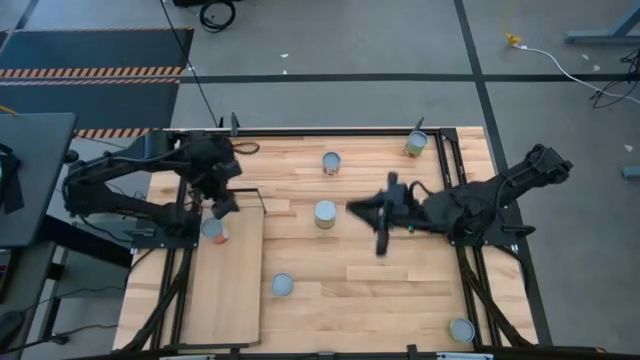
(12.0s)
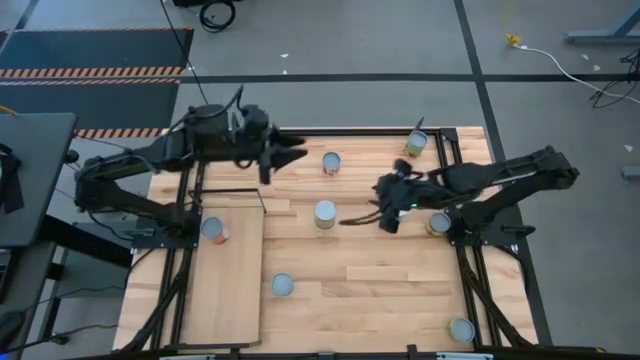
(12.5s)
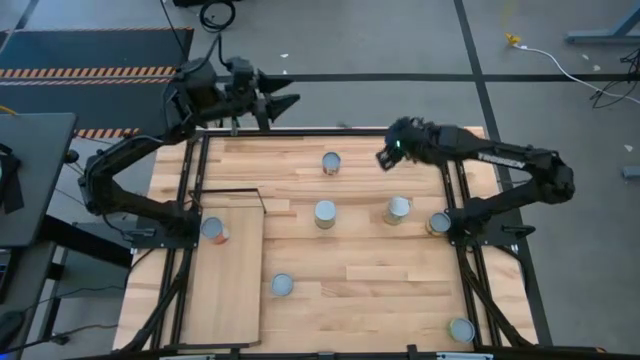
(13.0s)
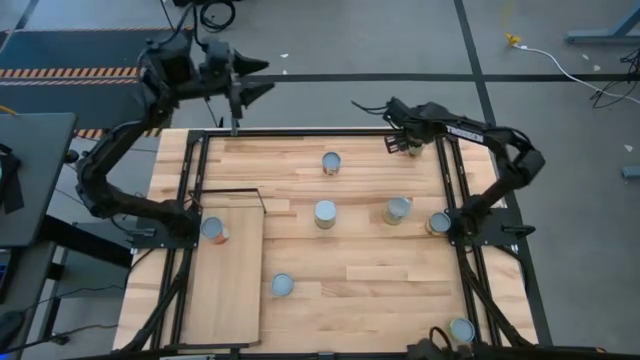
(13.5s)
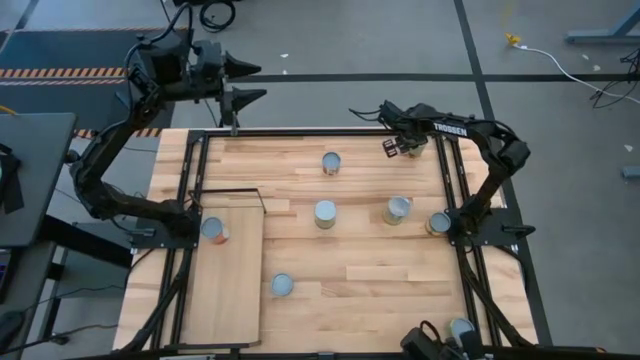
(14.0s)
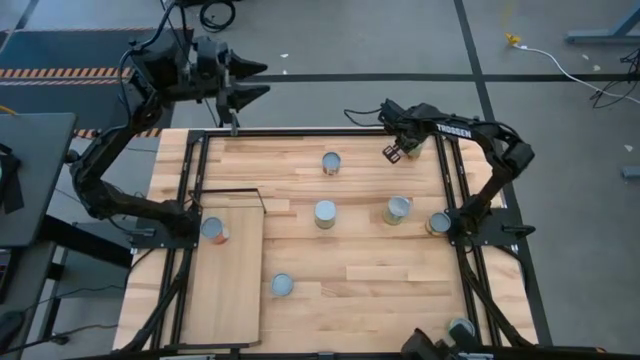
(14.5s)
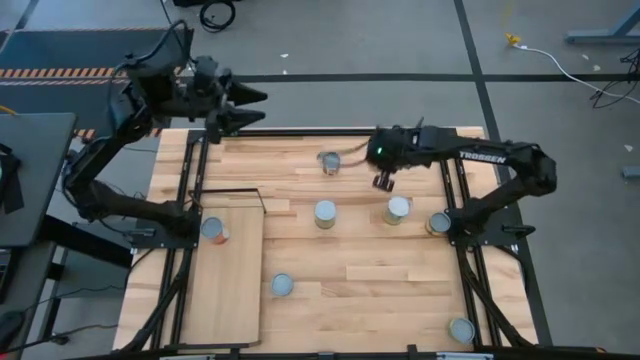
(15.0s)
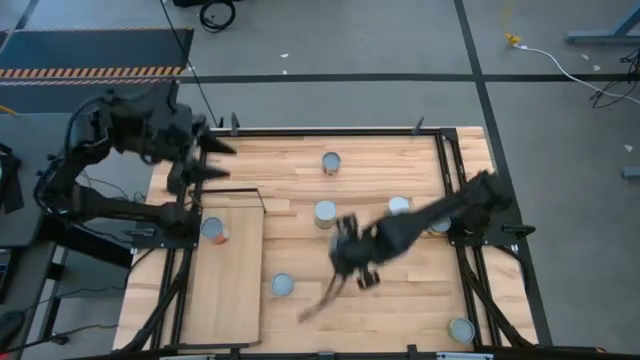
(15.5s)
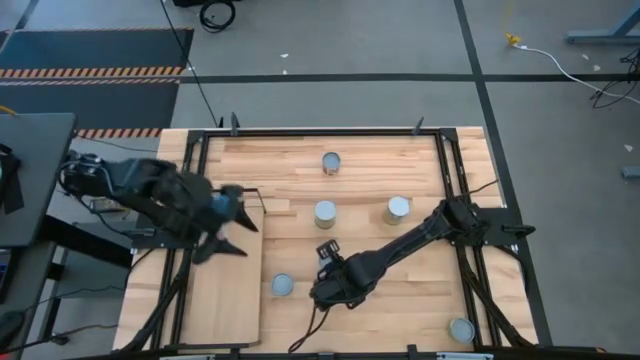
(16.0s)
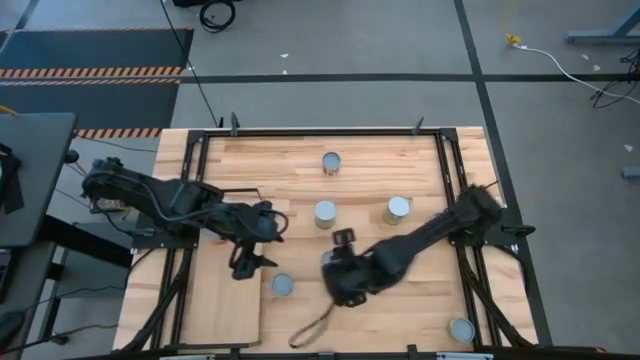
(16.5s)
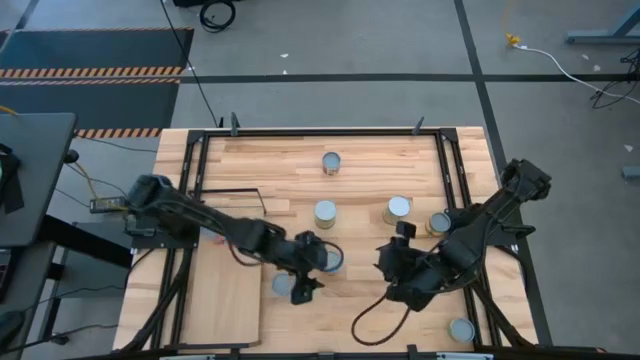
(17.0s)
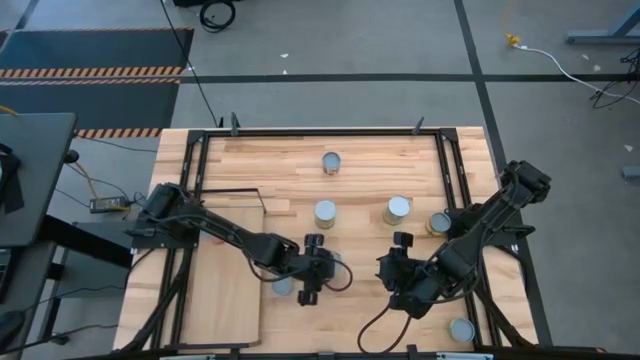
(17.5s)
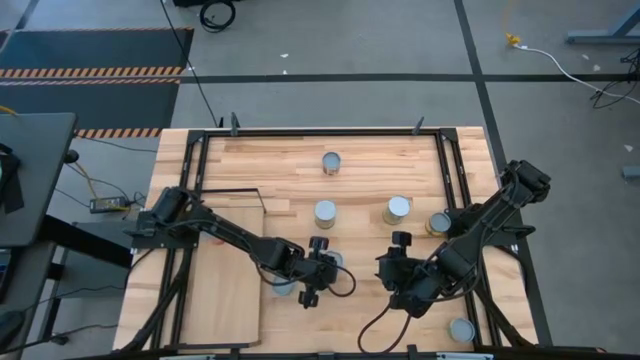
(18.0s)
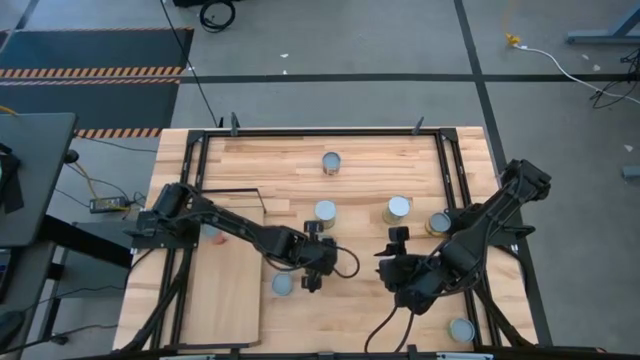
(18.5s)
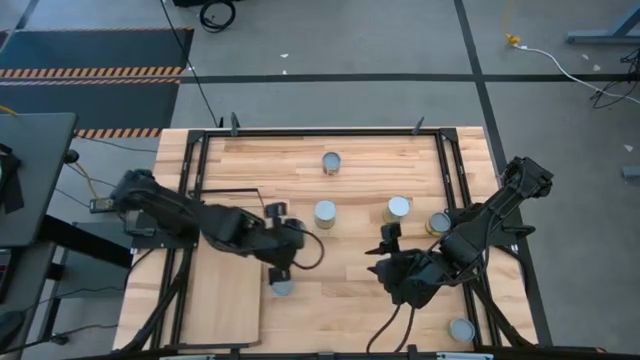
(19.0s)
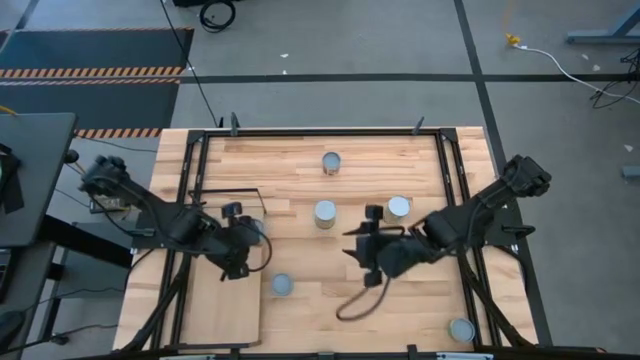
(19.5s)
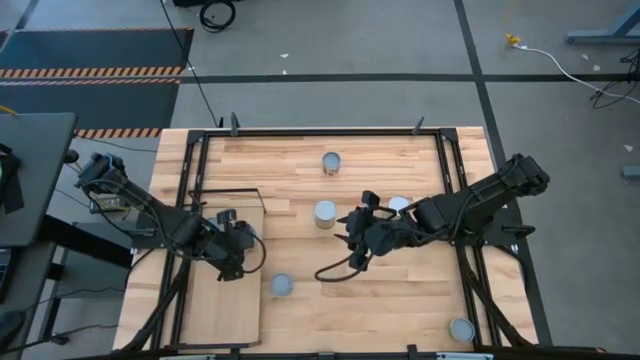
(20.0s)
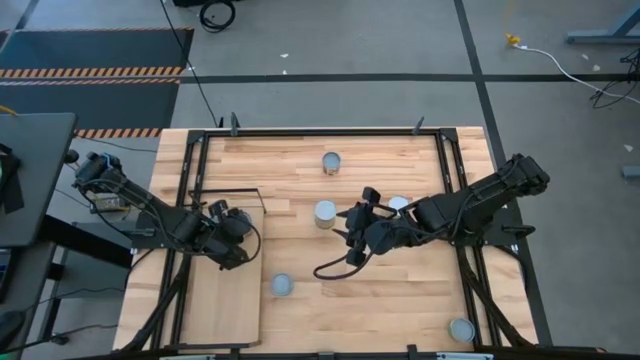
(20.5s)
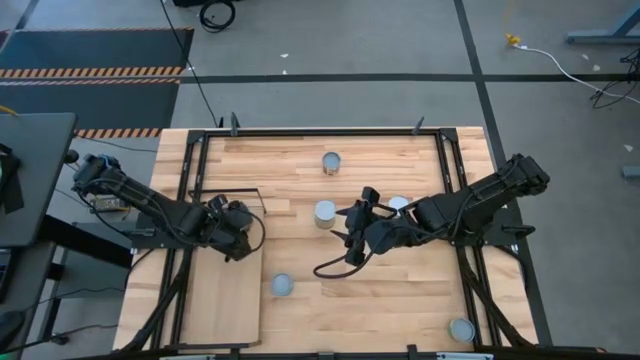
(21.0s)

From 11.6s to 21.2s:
Task: Pick and place cans onto a shelf
Put the green can on the shelf

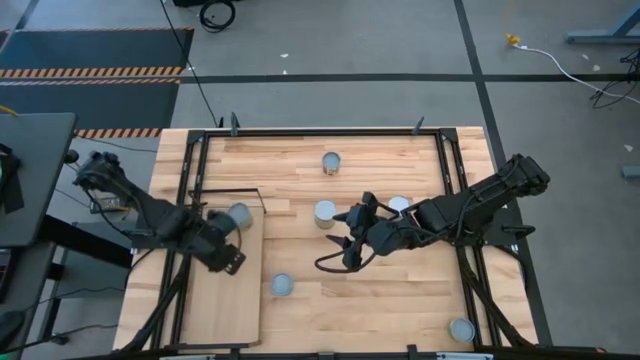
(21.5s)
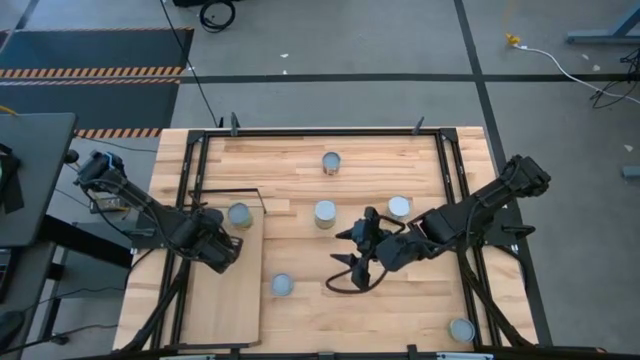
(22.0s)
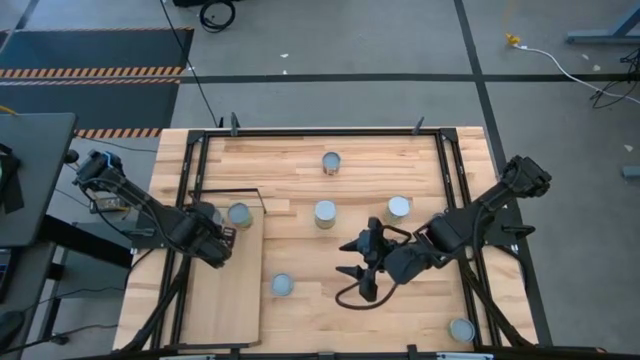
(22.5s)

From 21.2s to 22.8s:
Adjust the orange can on the shelf

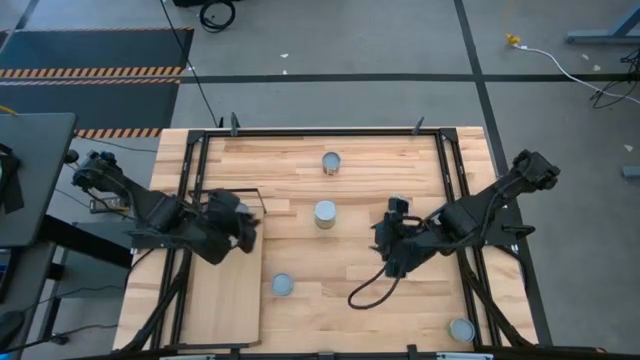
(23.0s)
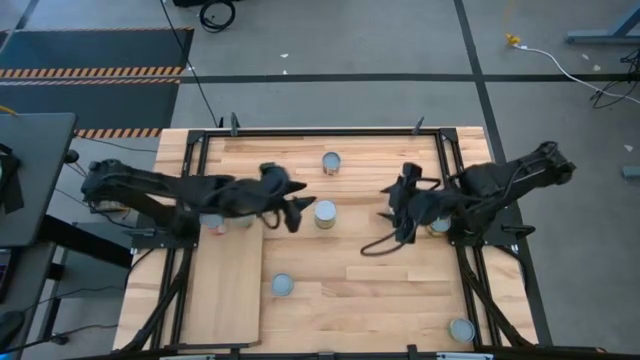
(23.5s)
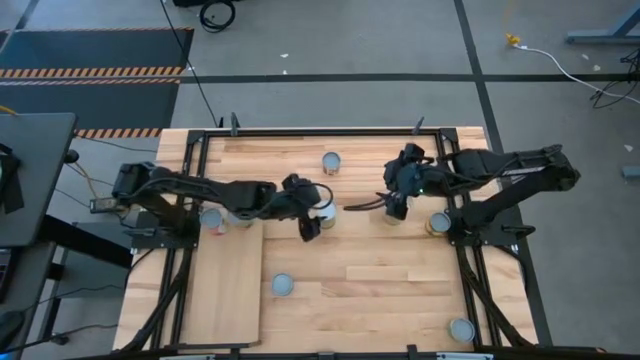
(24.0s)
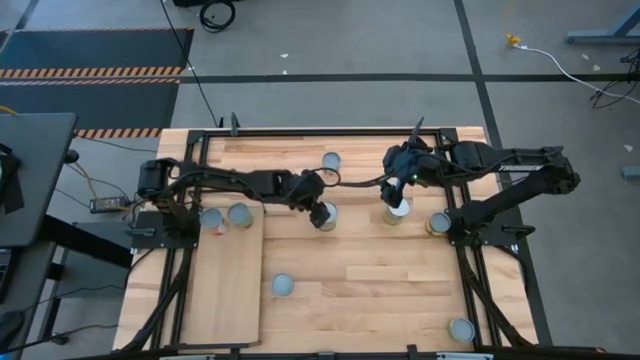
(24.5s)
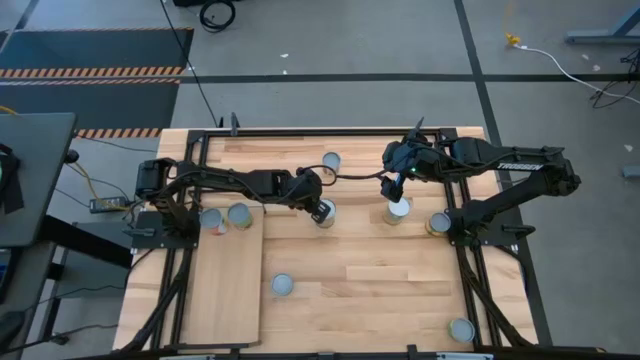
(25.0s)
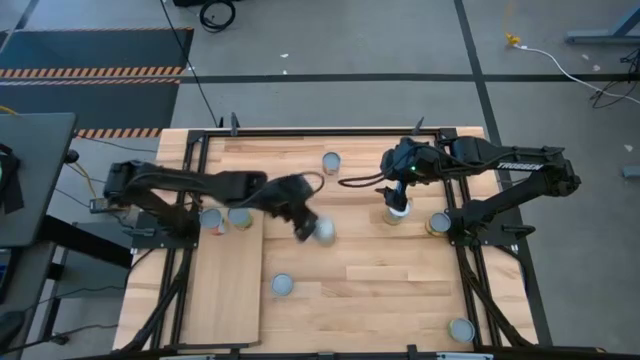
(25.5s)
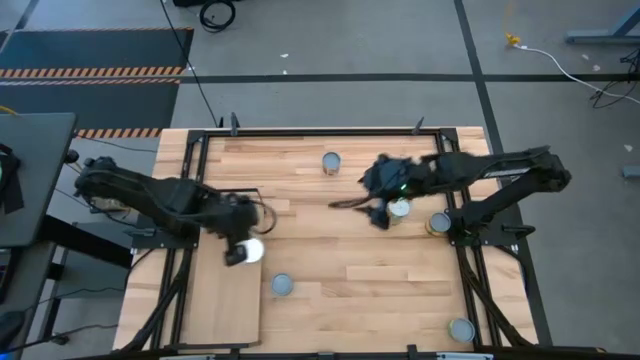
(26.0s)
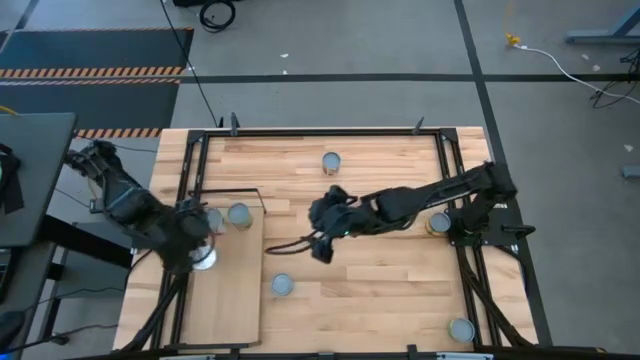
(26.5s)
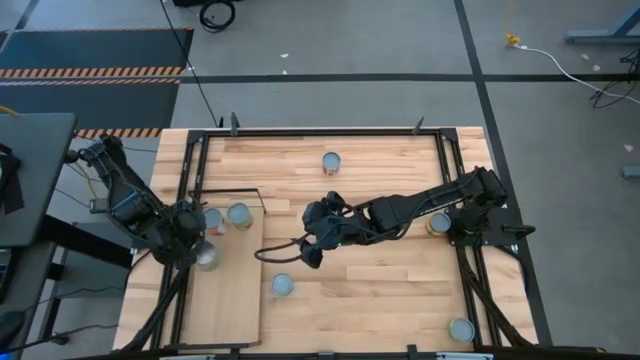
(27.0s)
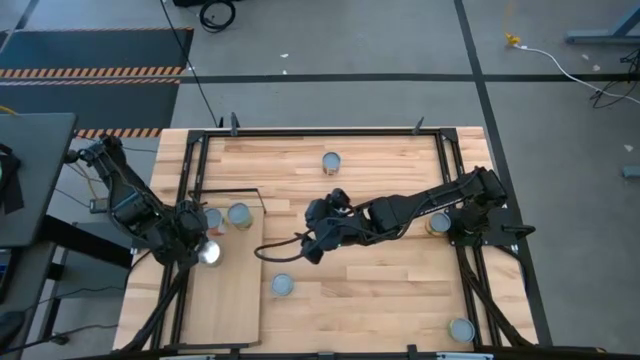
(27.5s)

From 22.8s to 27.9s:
Put the light green can on the shelf

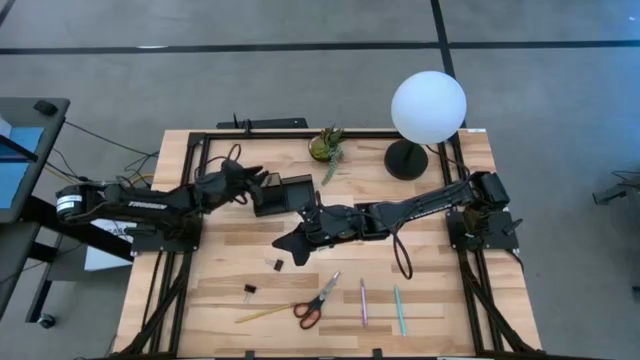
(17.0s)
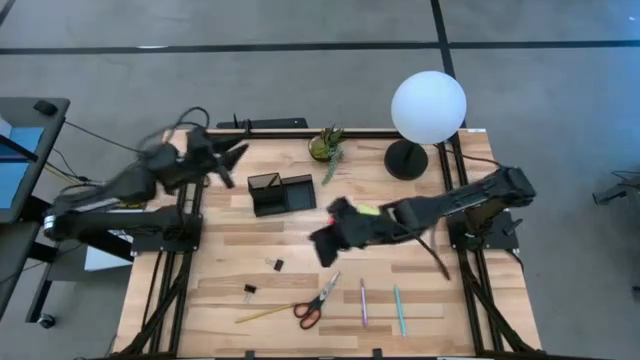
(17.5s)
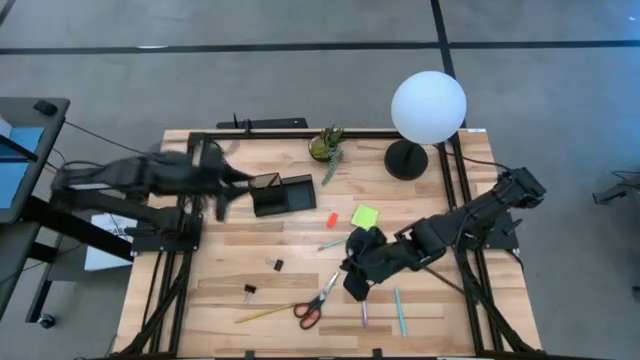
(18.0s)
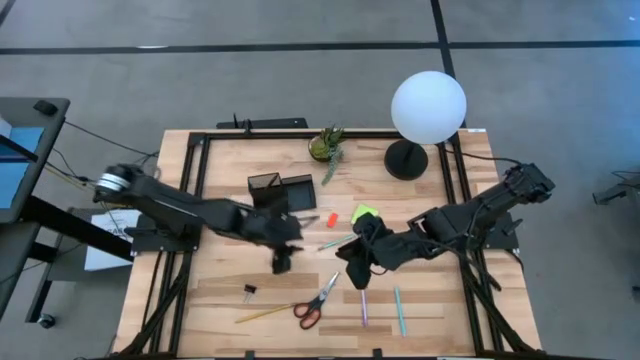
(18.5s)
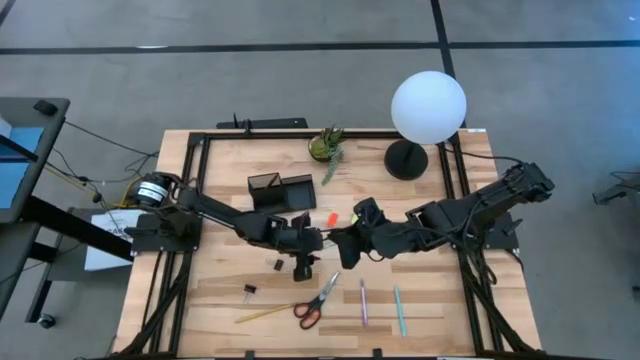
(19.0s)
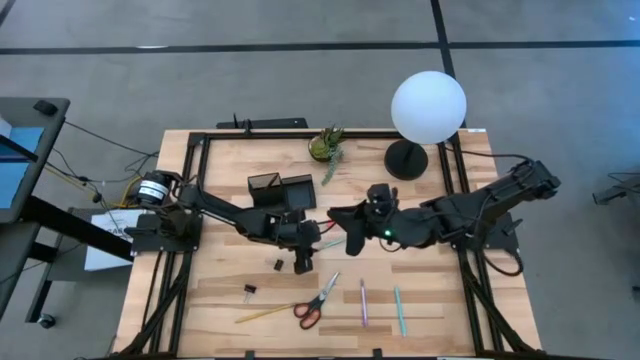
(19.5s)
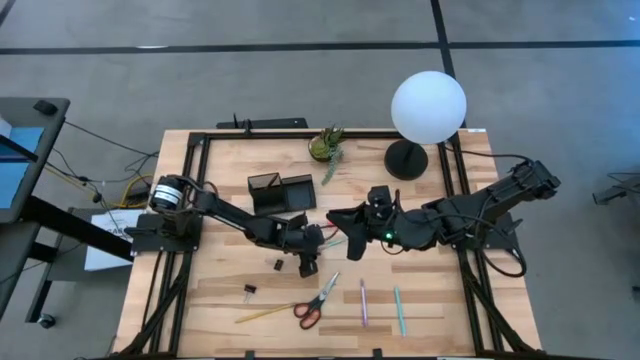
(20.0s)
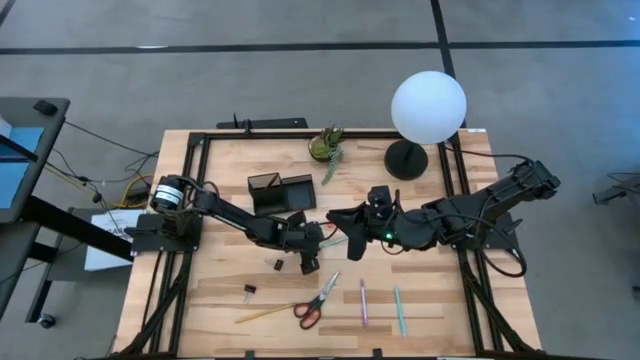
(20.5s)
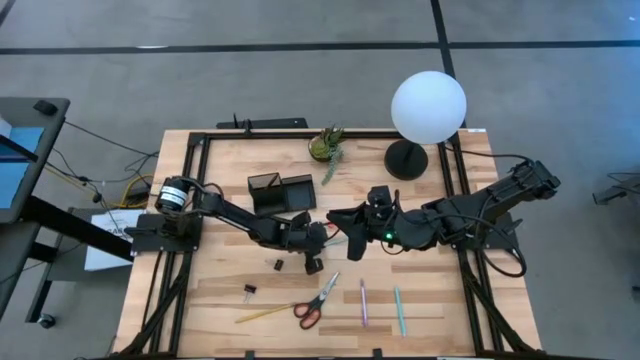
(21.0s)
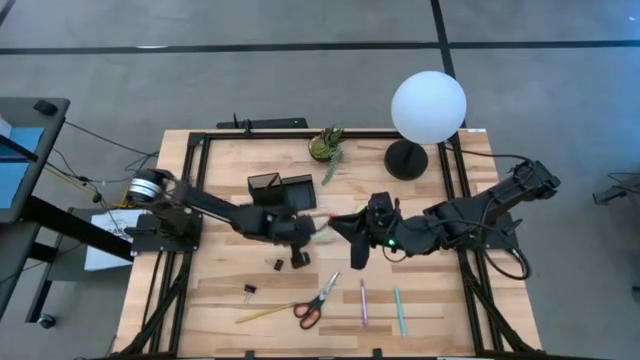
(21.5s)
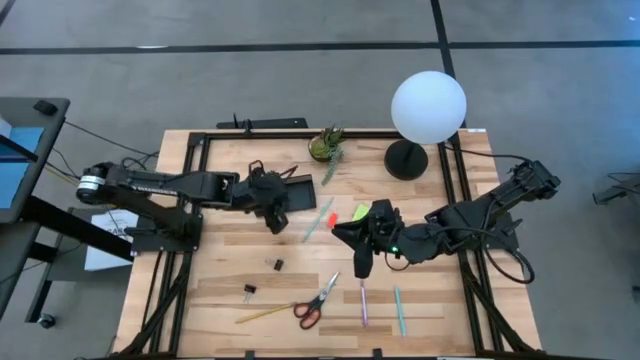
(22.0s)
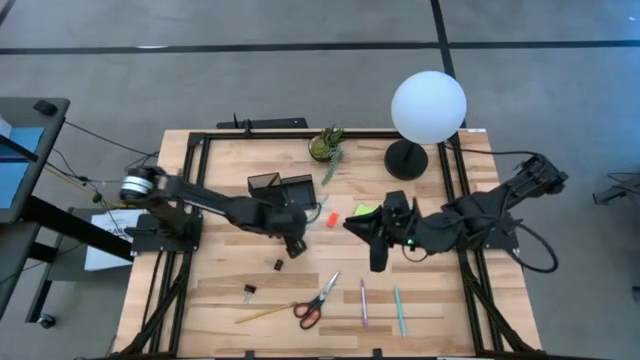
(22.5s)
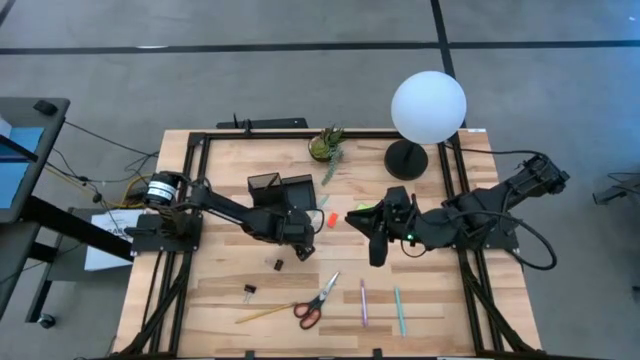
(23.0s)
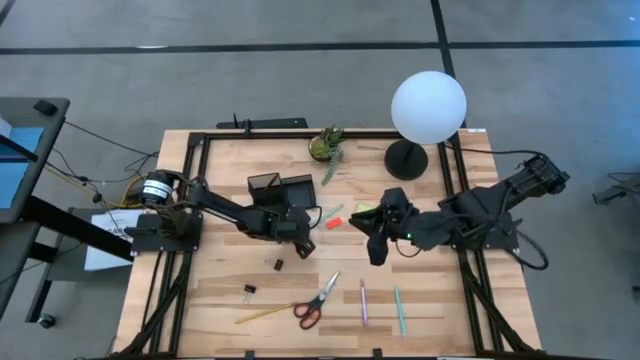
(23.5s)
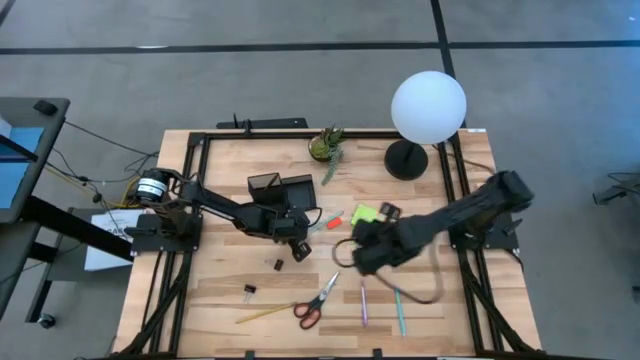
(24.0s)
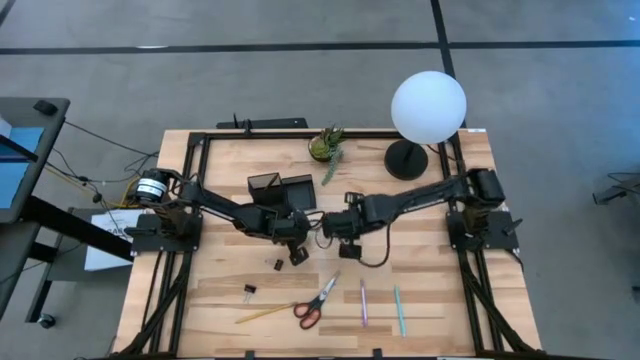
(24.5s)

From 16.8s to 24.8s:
Task: Pick and place office supplies into organizer
Put the blue pencil into the black desk organizer
